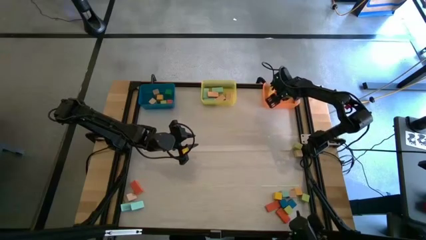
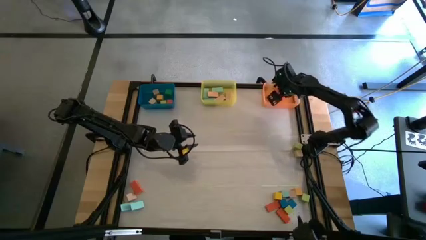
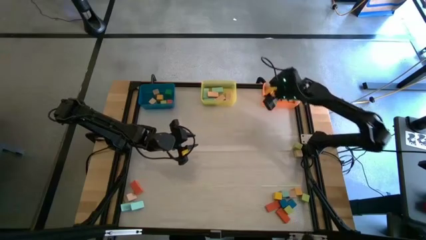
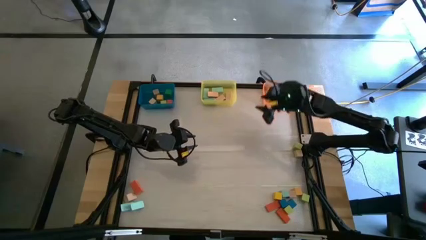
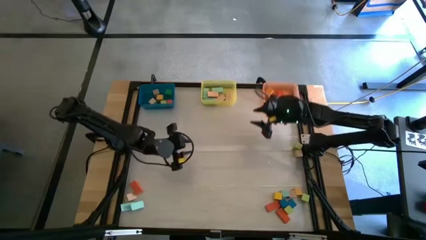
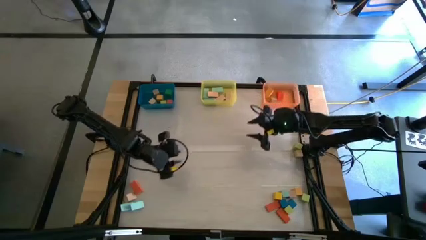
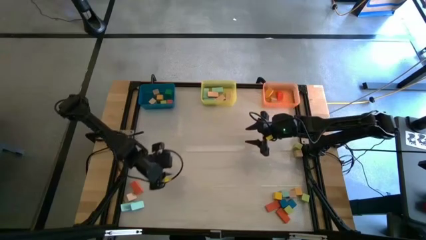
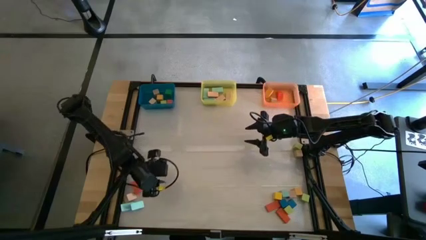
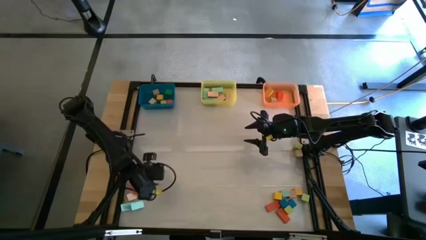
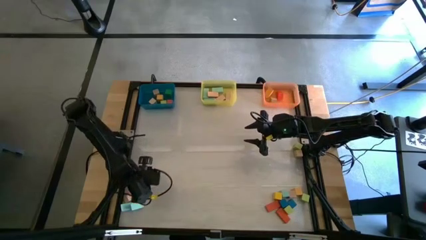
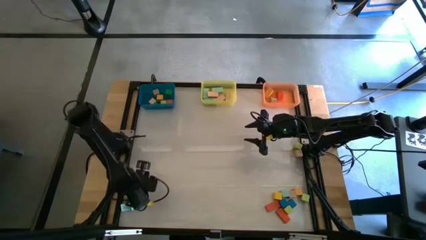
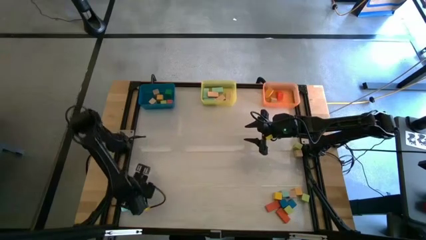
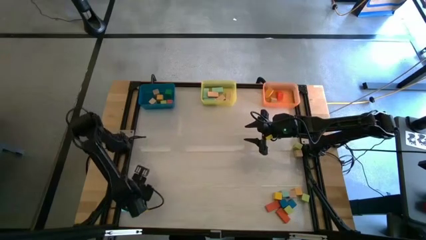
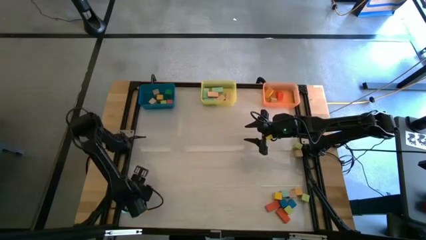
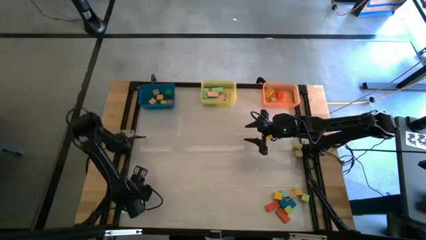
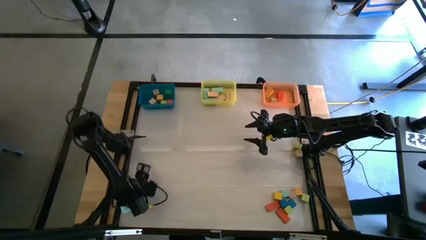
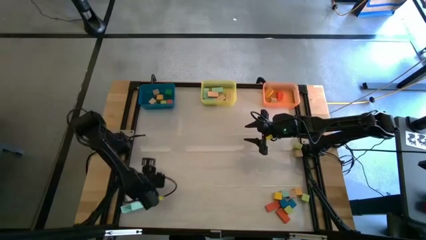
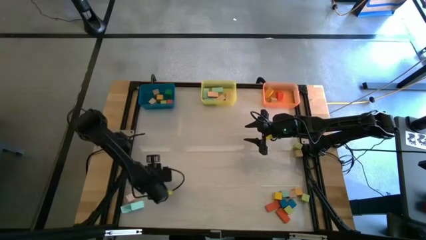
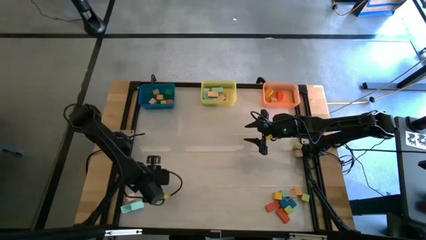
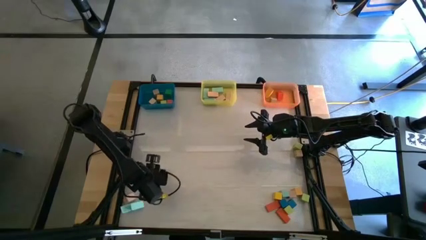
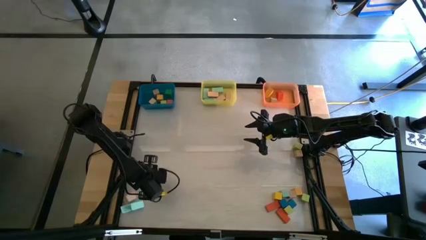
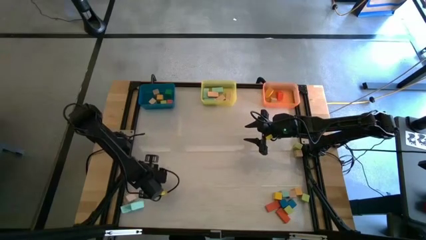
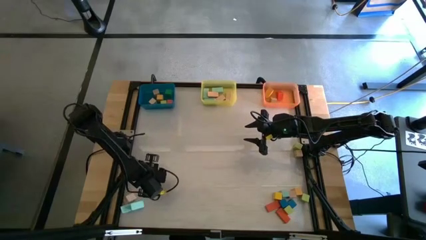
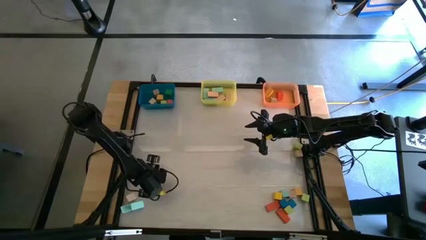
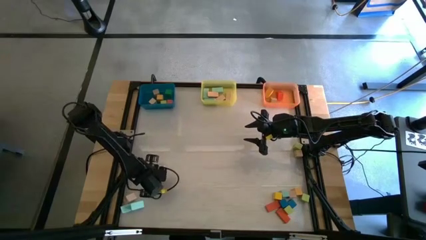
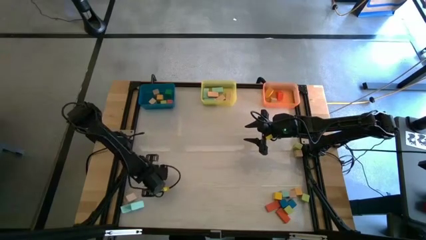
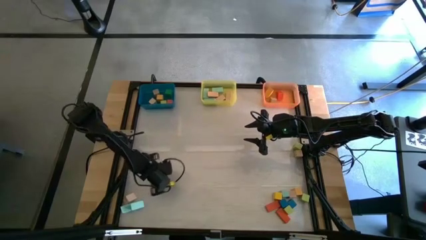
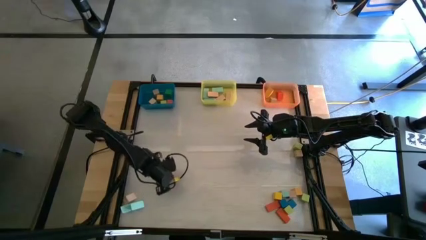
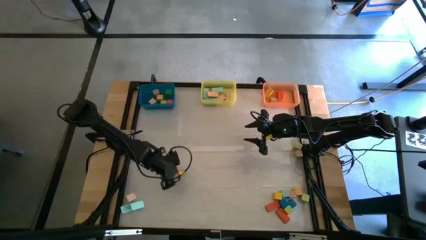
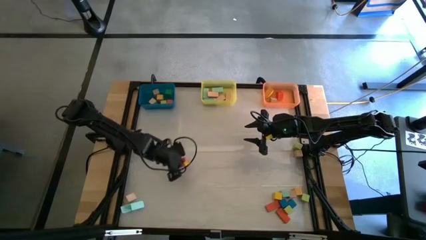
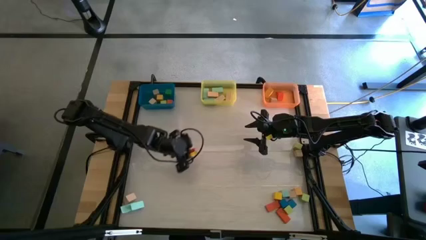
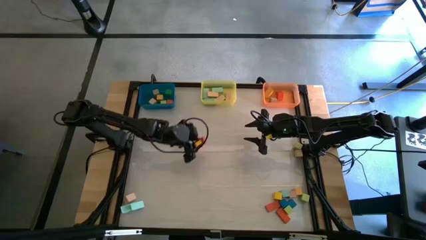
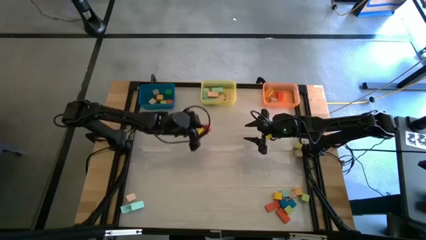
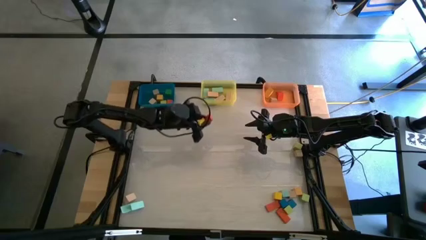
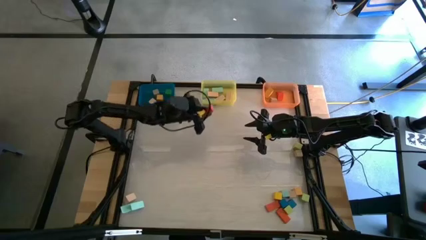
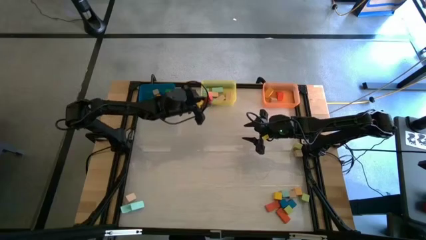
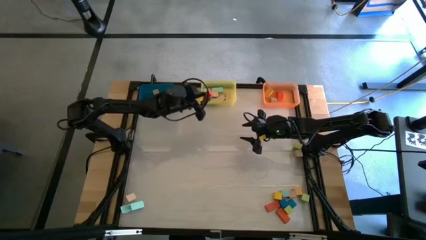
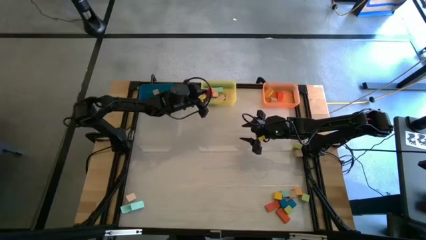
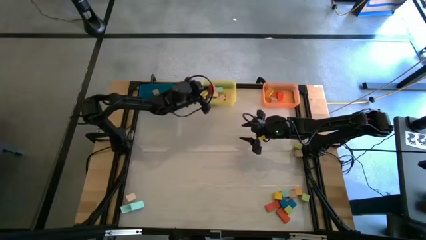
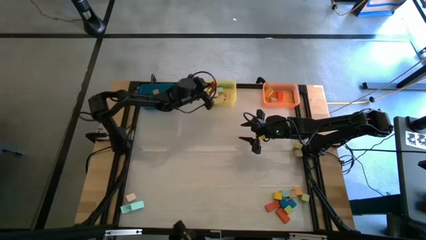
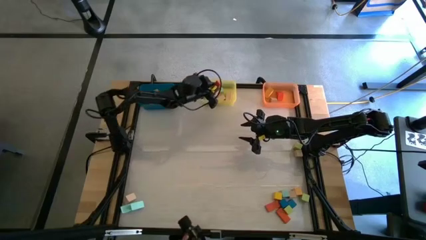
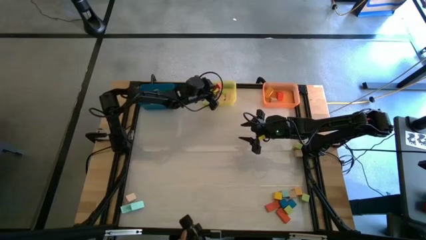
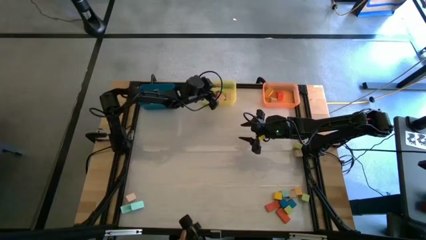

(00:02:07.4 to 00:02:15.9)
Task: Sort blocks by size
Put the orange rectangle block into the yellow bin

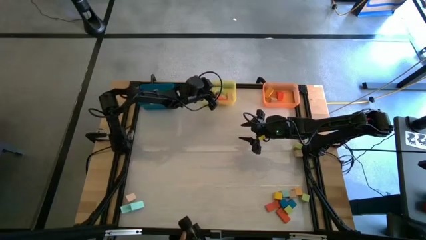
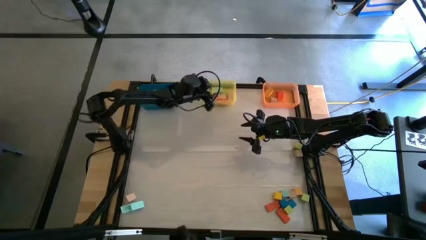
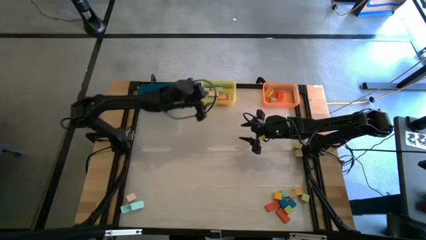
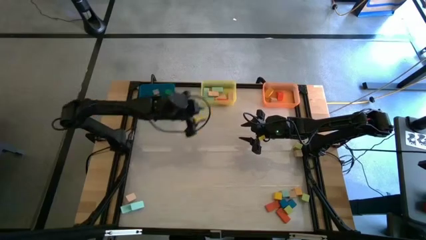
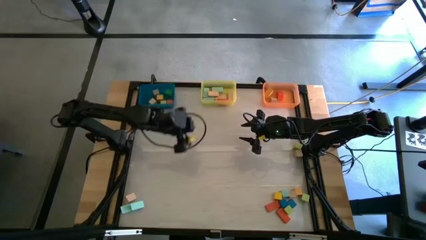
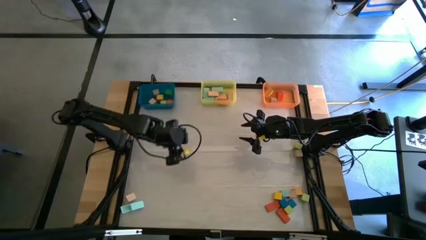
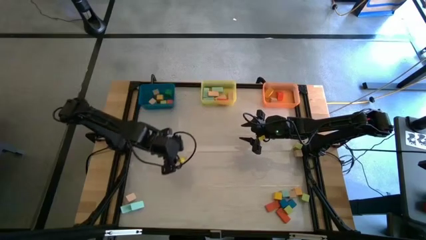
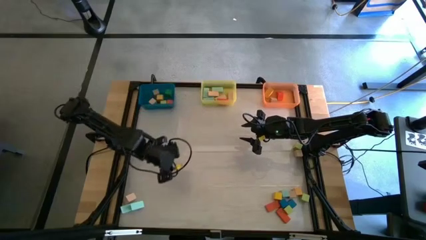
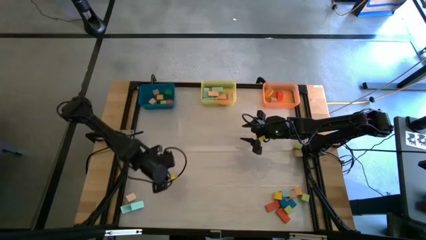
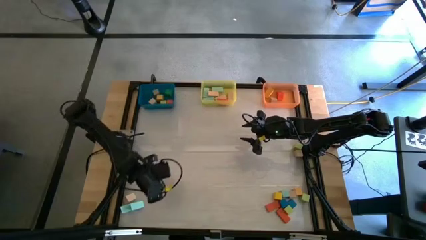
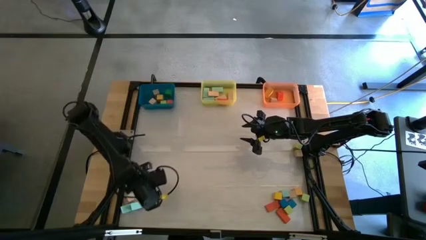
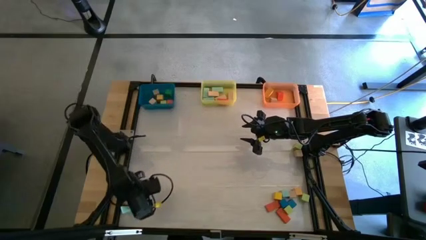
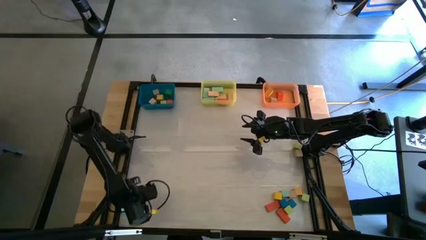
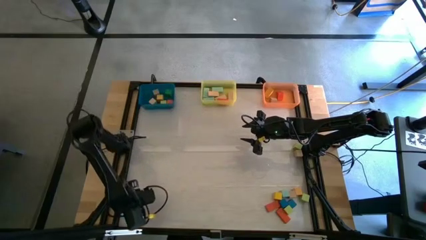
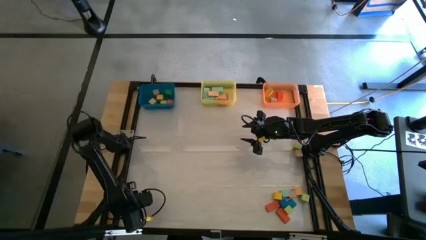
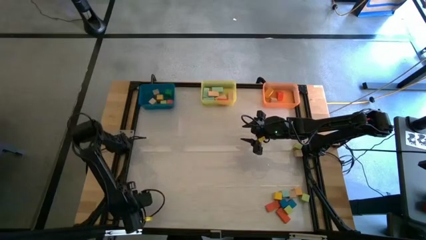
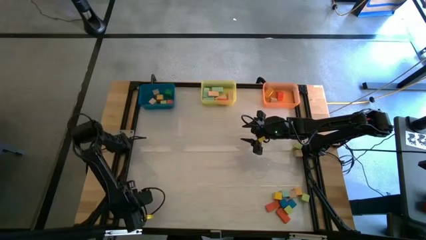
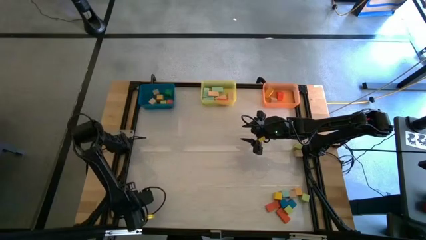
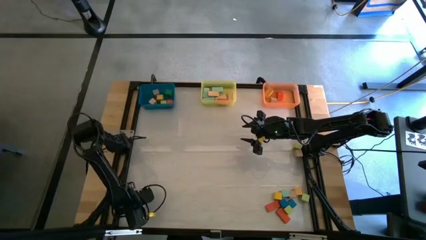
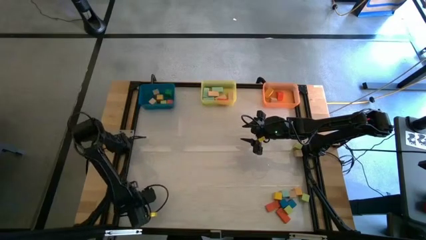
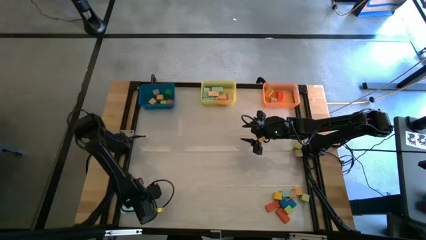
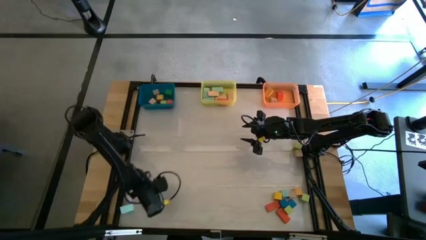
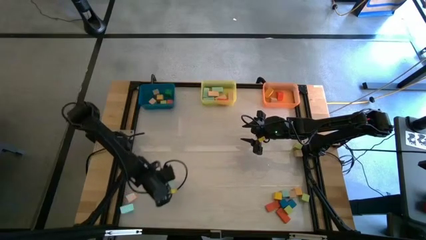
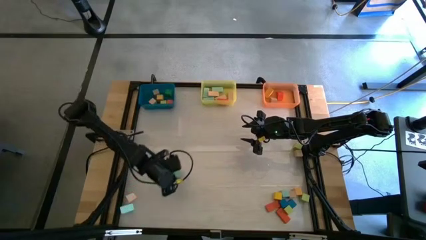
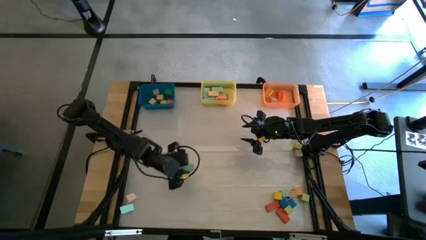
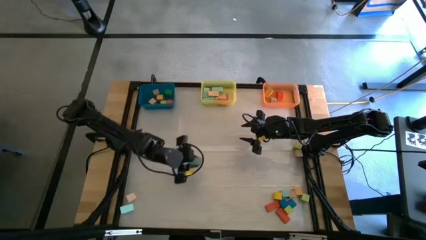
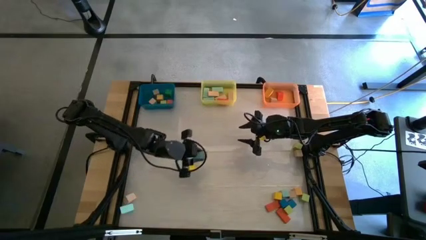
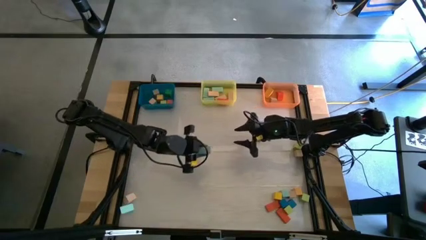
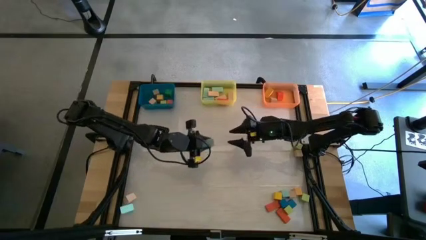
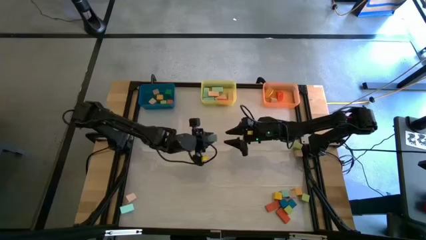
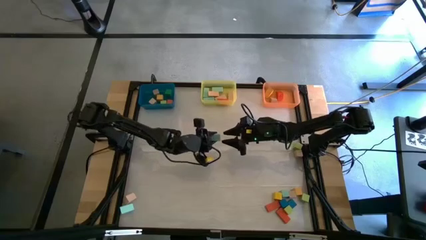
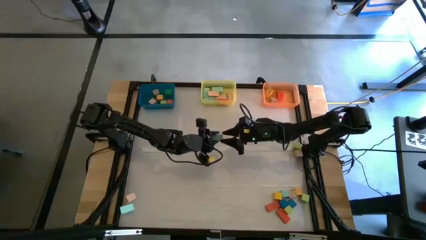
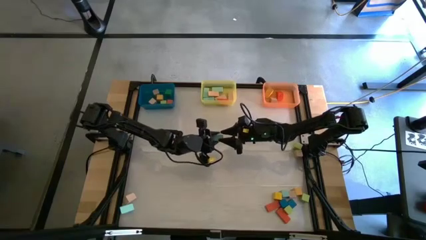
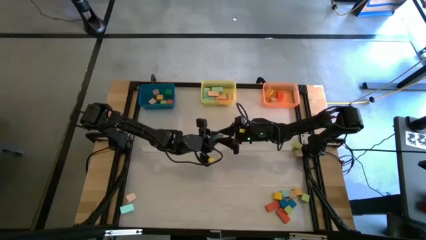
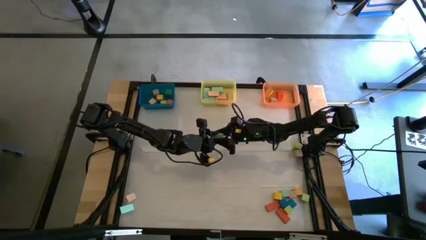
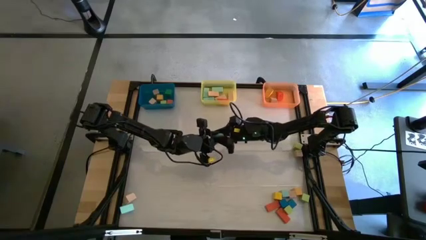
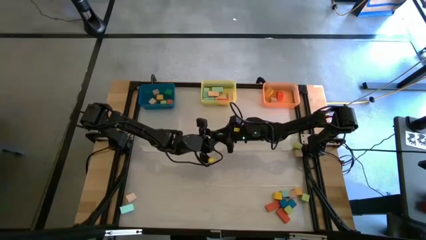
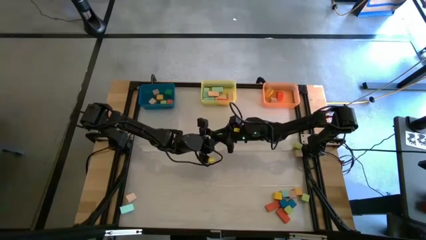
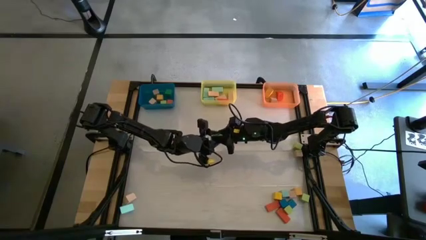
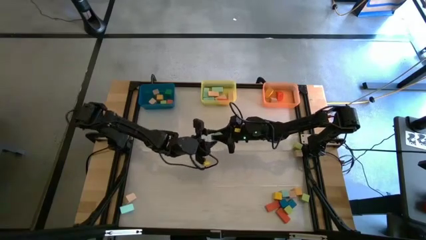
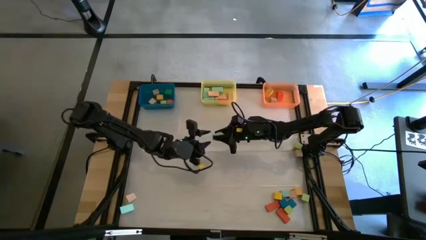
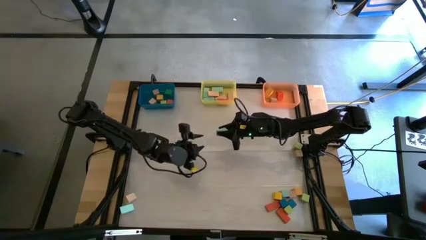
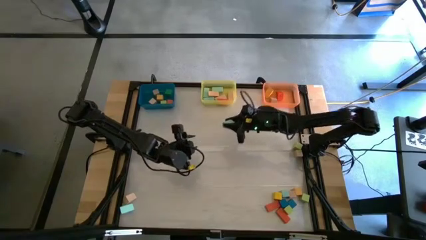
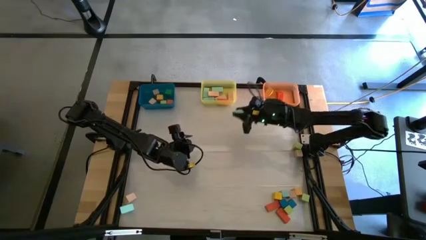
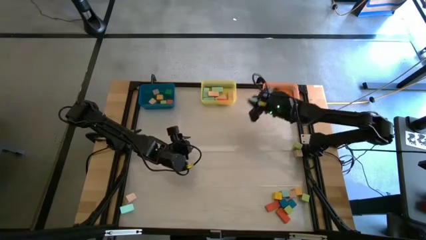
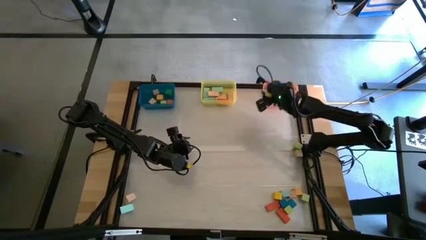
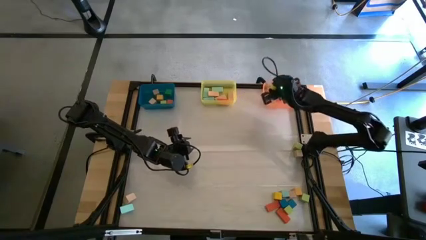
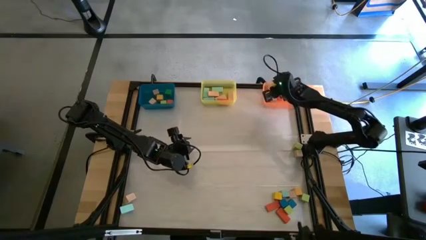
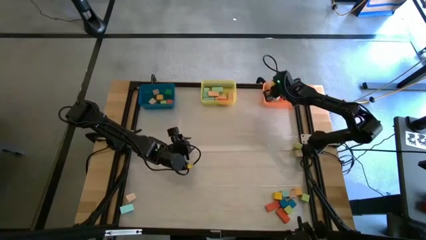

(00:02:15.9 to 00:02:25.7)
Put the light blue triangle block into the orange bin
